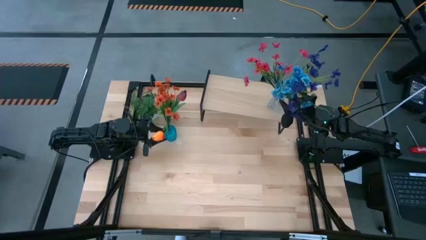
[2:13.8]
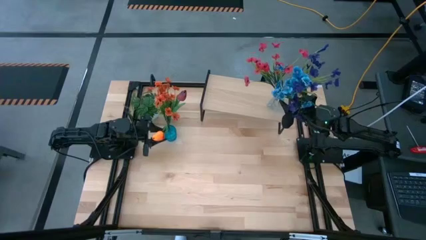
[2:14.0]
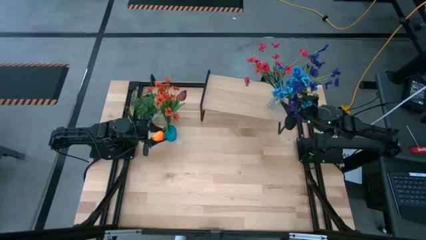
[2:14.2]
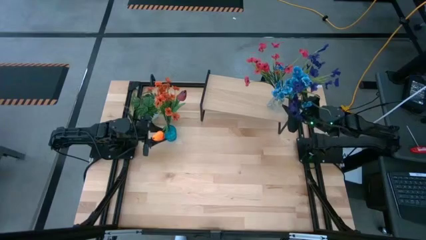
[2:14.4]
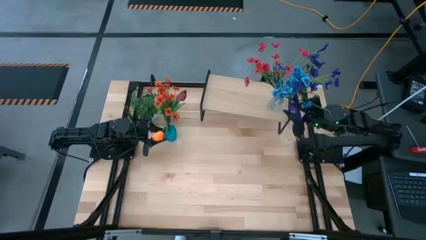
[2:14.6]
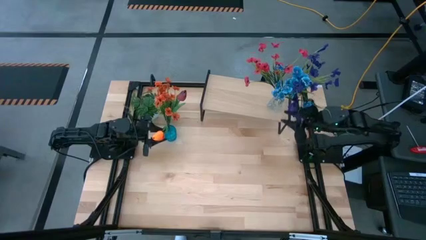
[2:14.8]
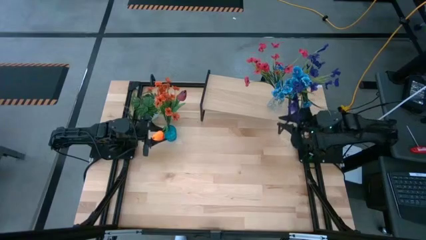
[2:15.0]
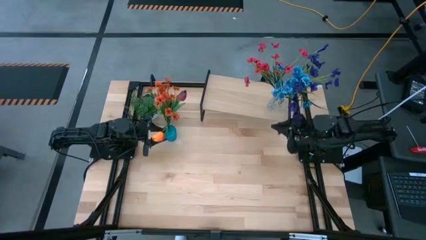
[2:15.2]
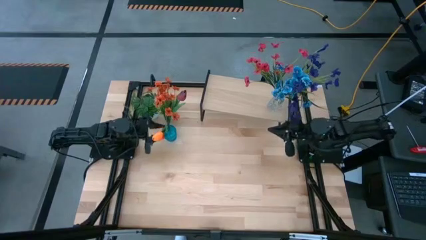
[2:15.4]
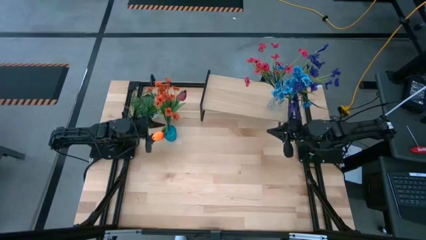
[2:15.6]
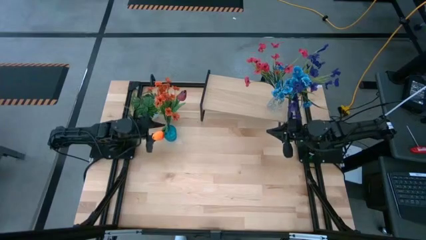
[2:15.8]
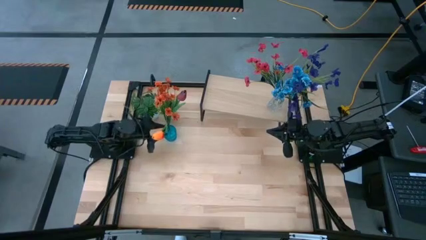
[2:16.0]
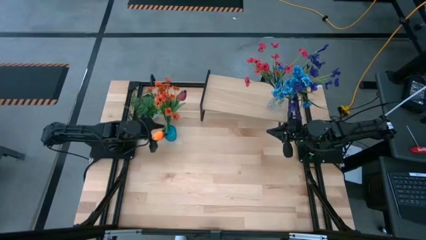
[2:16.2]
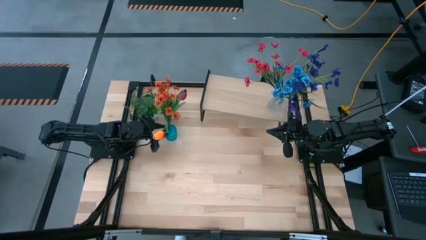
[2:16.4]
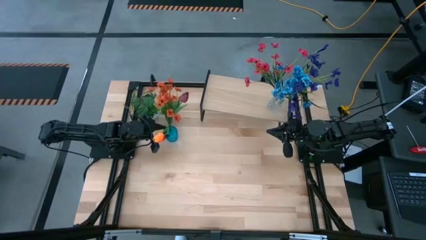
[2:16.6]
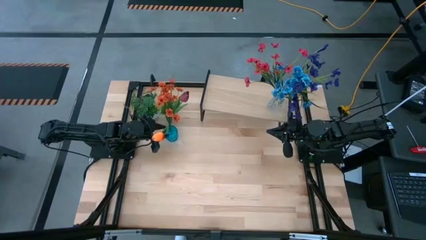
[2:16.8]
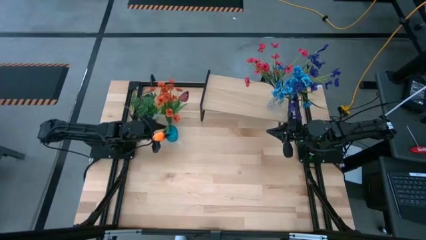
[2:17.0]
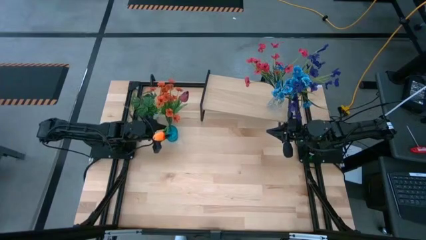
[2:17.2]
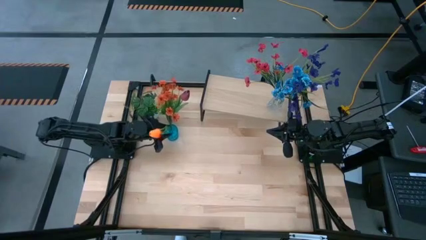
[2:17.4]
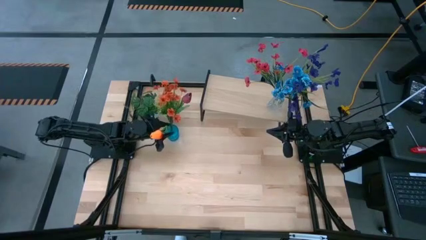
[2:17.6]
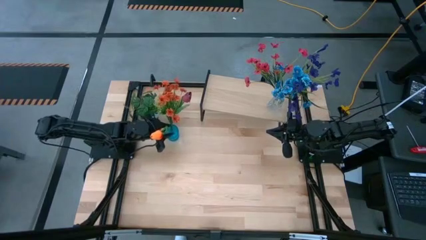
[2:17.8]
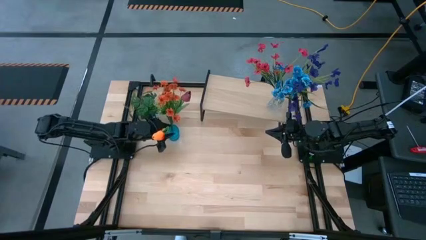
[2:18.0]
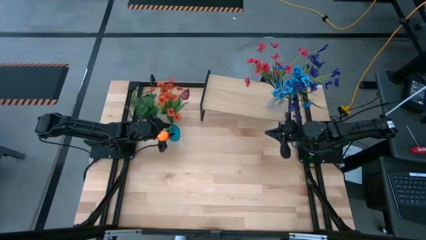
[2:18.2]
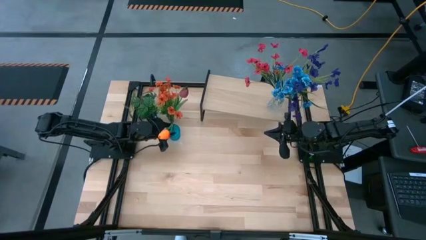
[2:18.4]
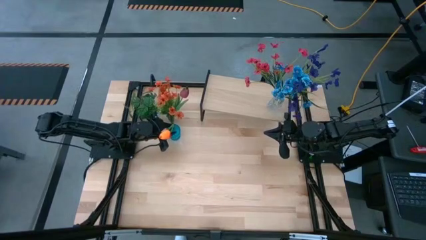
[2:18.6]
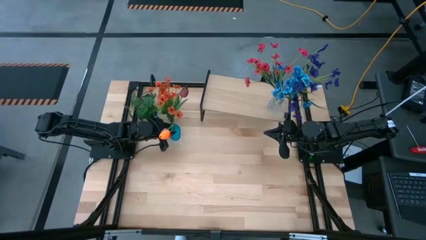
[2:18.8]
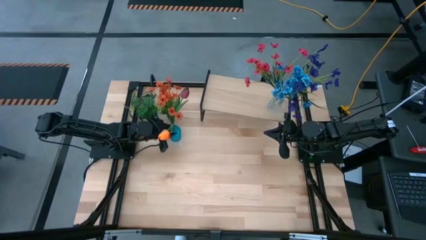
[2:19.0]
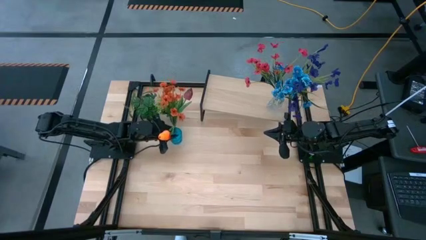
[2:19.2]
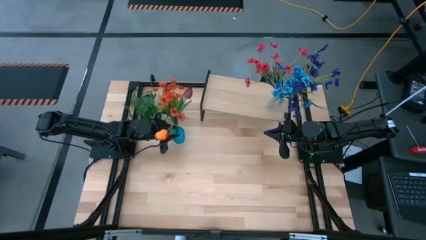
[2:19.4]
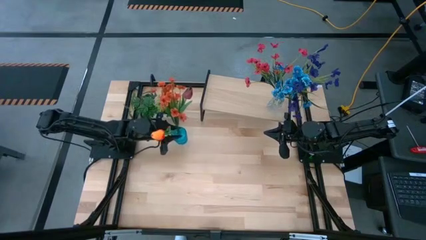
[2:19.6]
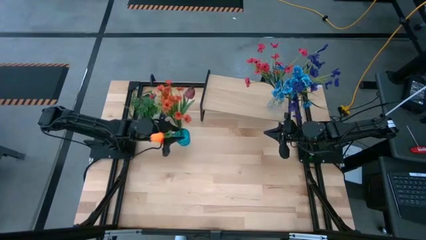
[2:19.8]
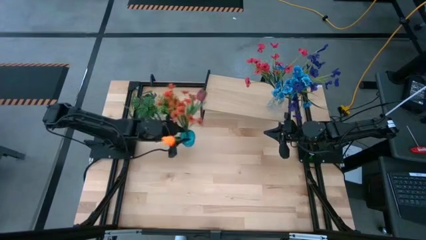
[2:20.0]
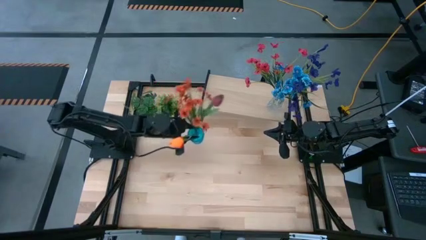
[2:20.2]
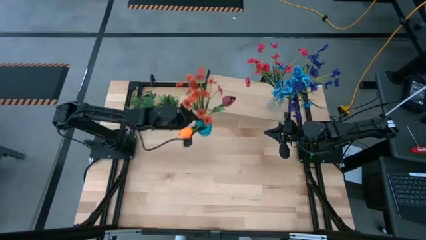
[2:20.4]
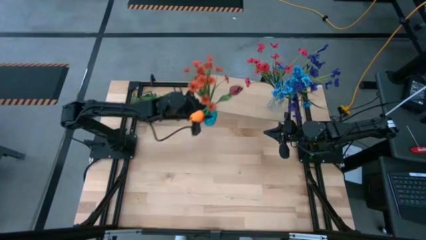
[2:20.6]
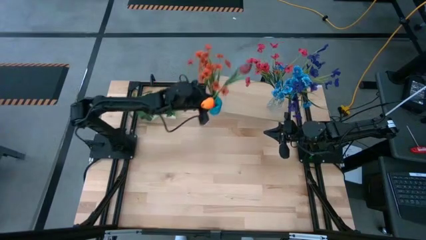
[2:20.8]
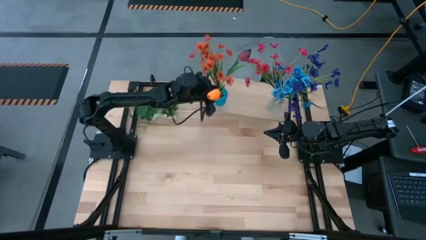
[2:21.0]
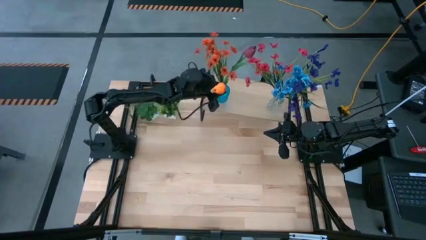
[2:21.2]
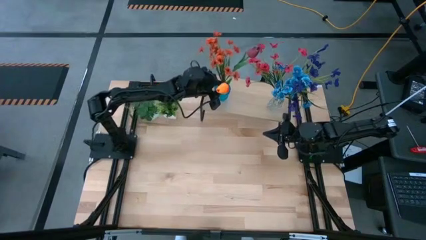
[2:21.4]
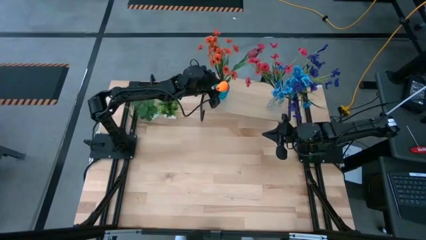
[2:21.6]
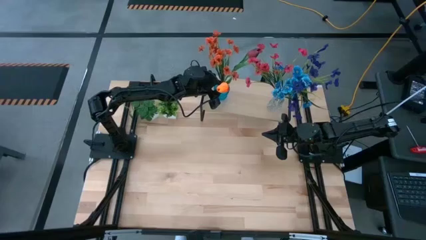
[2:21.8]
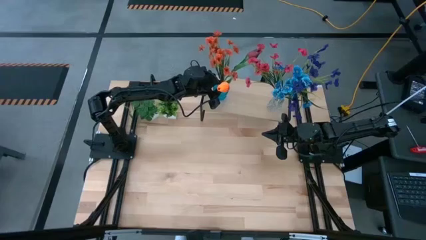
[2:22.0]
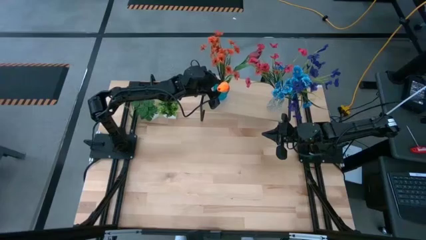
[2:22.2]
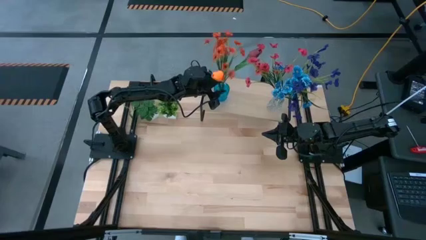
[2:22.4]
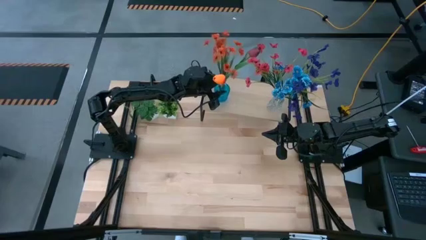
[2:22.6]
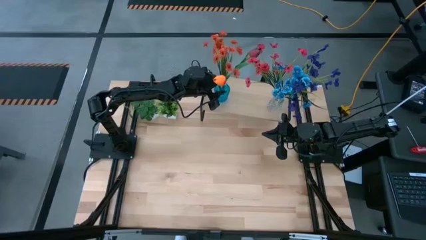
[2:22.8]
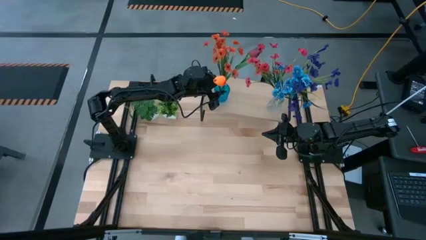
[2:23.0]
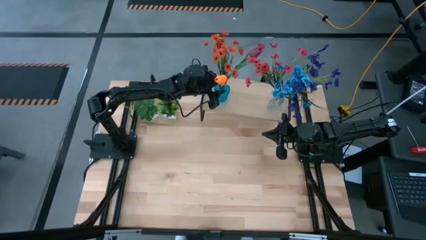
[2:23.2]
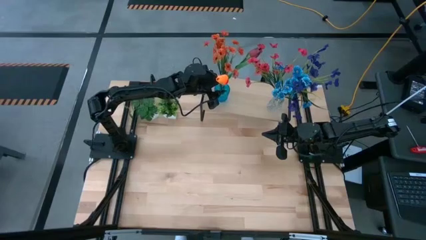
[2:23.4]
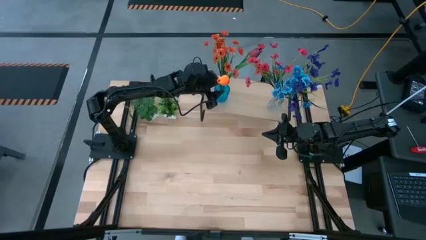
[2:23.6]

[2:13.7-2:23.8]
Task: Pick and place flowers into a vace then onto a shelf
Put the blue vase with flowers on the shelf

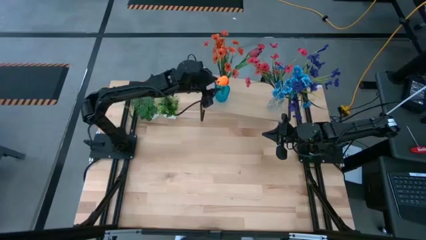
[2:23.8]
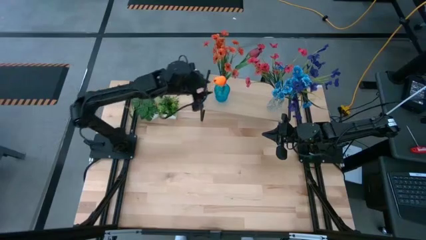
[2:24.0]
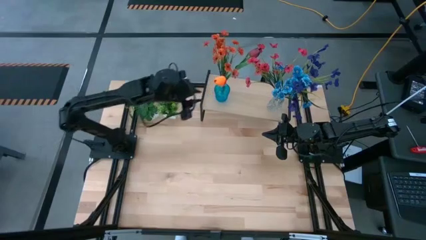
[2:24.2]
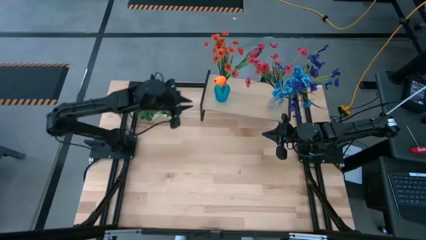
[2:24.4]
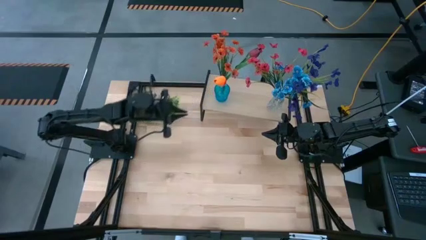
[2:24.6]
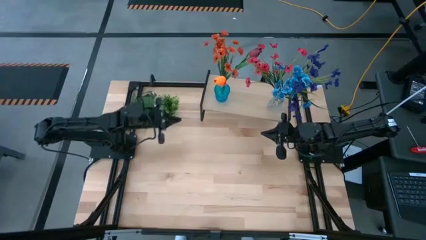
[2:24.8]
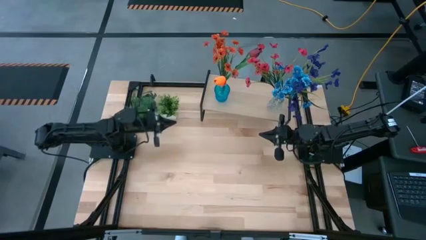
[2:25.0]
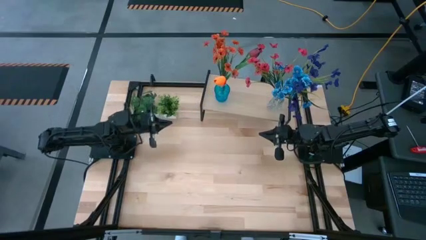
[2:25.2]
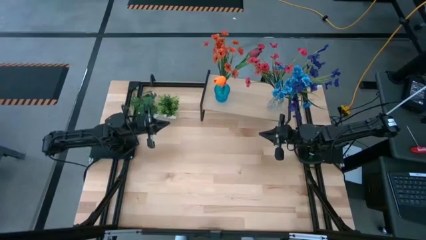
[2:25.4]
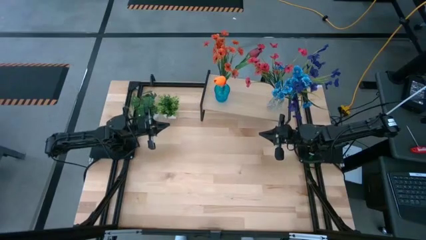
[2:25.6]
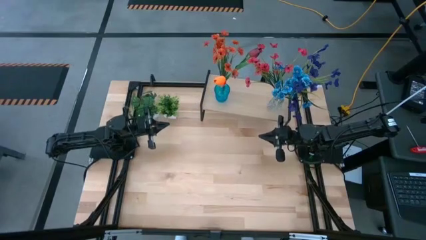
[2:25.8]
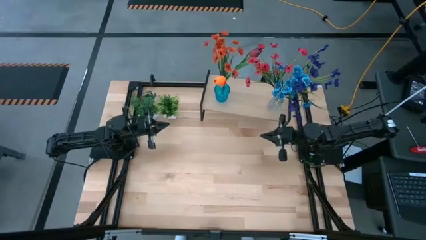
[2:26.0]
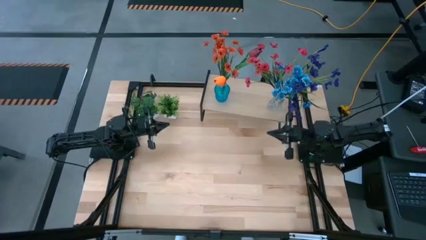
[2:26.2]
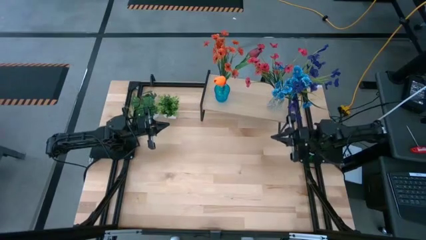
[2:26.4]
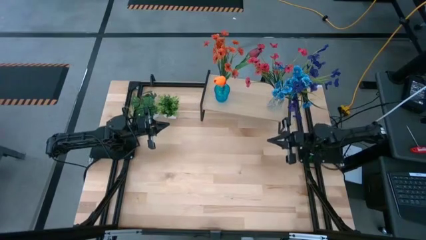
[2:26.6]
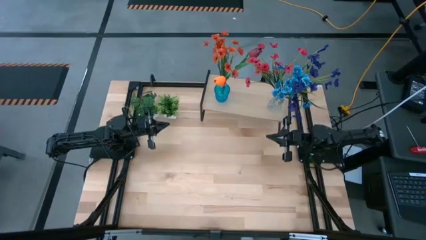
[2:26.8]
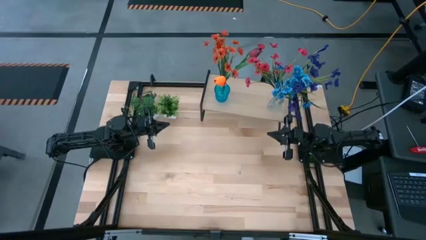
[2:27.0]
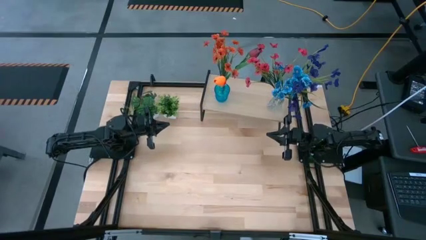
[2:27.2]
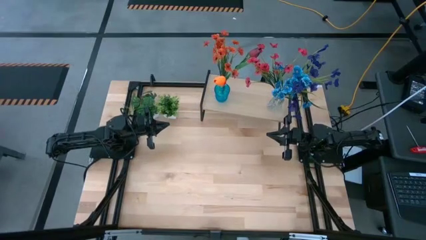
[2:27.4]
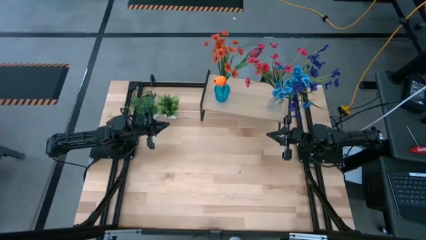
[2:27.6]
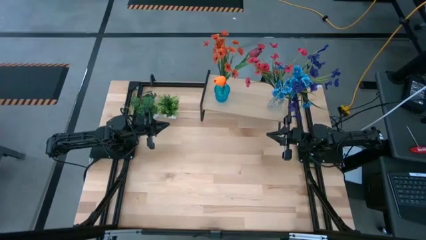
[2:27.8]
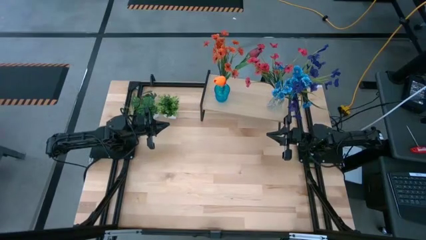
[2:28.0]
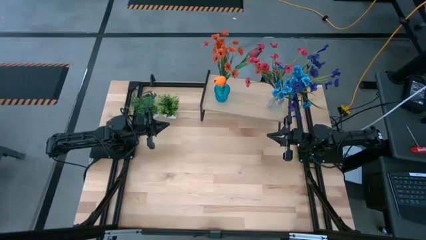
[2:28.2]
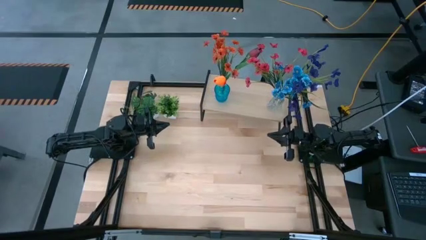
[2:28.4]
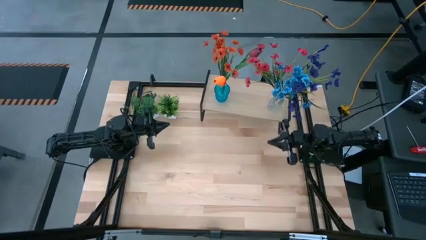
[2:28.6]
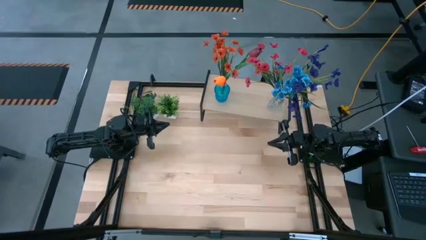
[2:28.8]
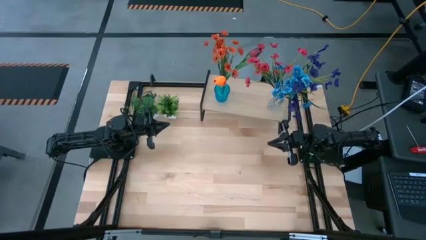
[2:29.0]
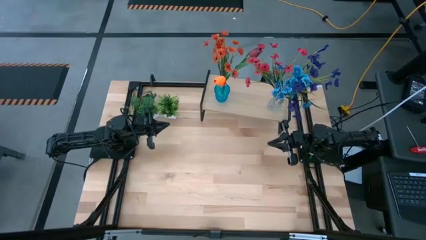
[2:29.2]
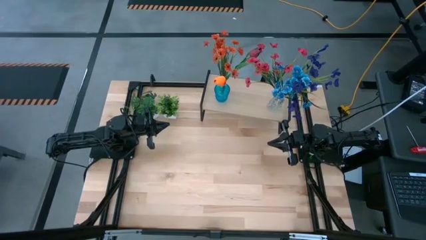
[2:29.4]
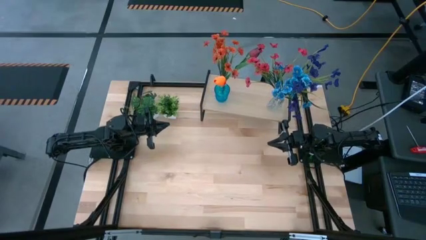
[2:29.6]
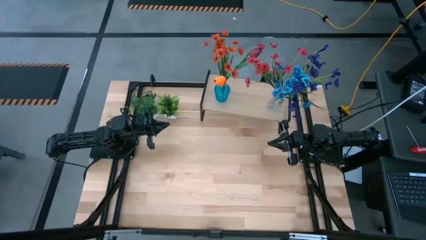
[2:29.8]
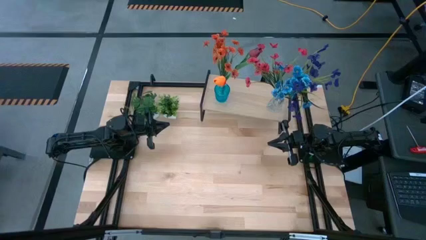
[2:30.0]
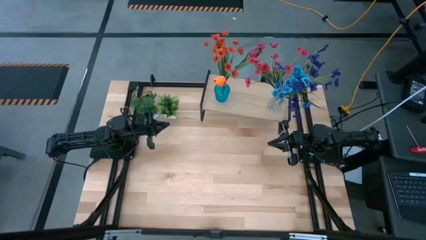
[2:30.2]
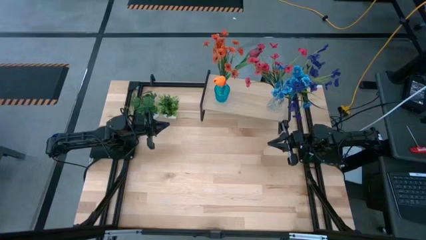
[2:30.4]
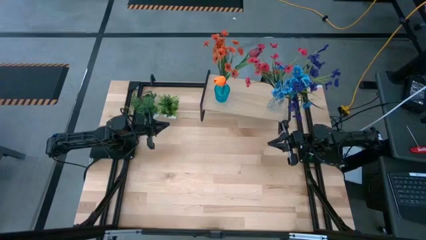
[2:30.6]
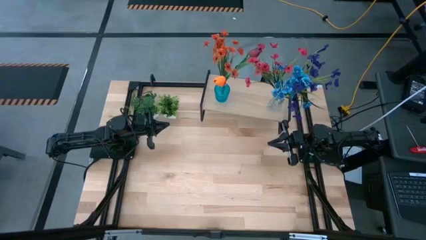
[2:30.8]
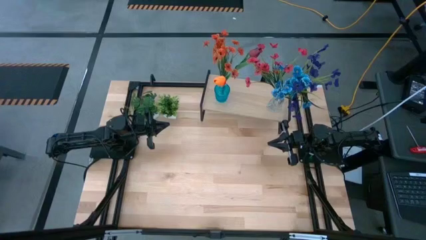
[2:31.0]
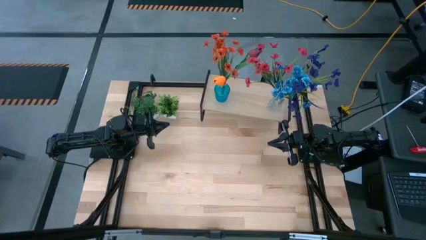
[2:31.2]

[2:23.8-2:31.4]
Return to Home Position
